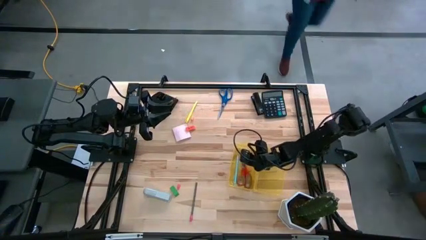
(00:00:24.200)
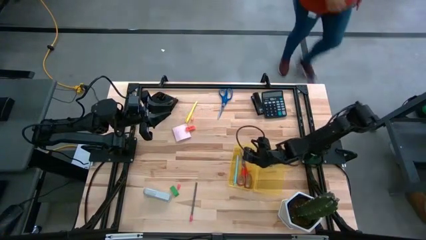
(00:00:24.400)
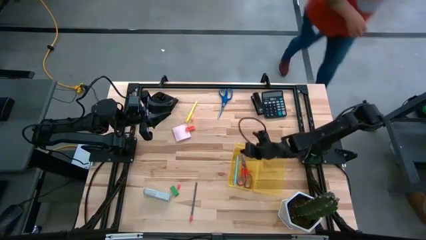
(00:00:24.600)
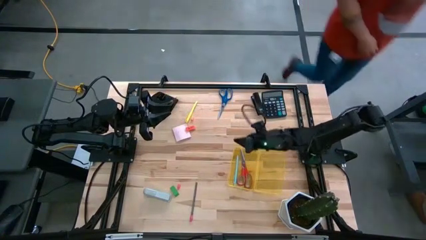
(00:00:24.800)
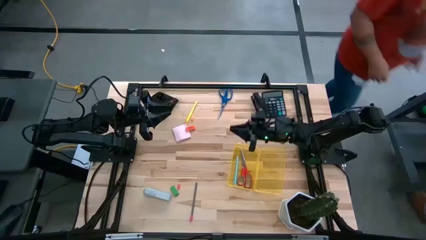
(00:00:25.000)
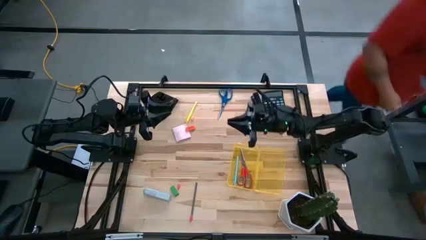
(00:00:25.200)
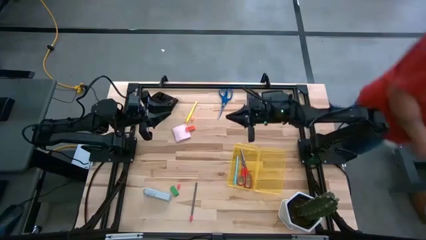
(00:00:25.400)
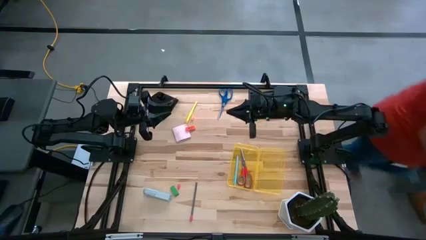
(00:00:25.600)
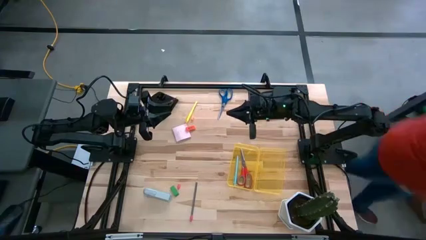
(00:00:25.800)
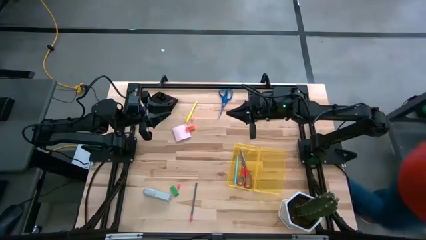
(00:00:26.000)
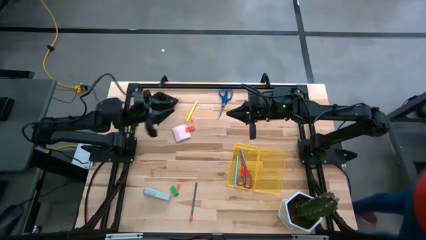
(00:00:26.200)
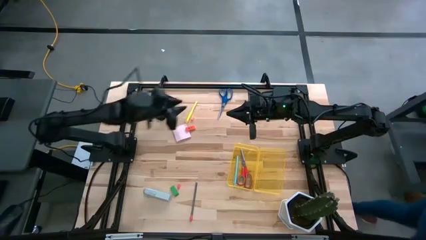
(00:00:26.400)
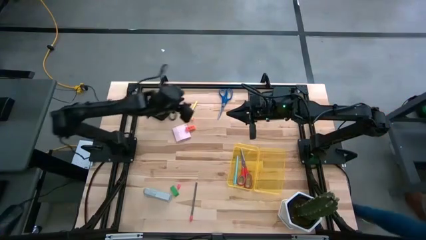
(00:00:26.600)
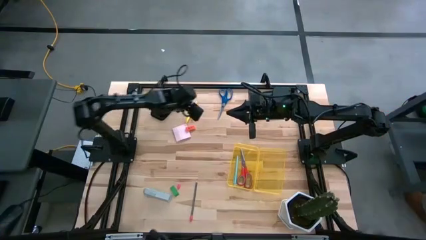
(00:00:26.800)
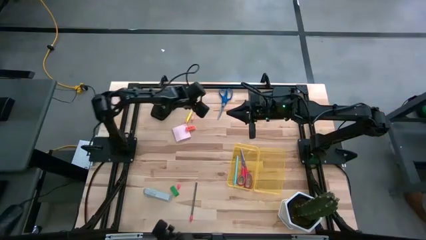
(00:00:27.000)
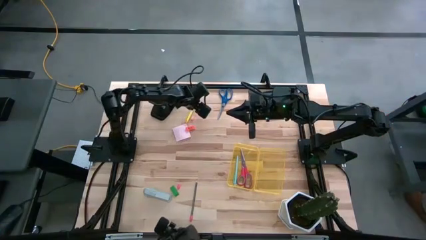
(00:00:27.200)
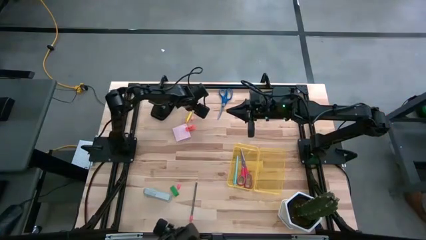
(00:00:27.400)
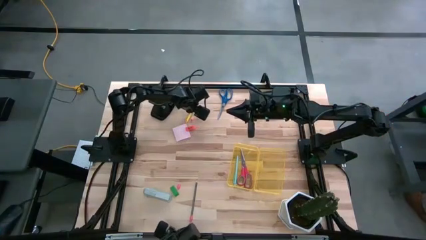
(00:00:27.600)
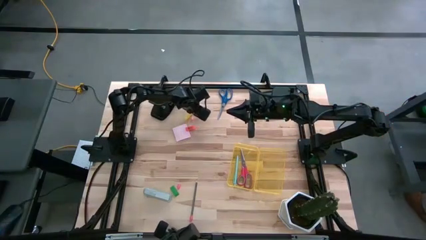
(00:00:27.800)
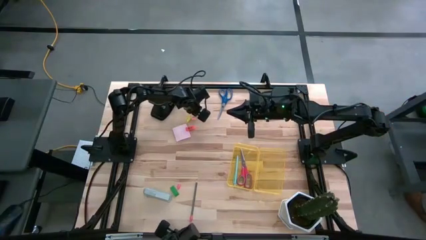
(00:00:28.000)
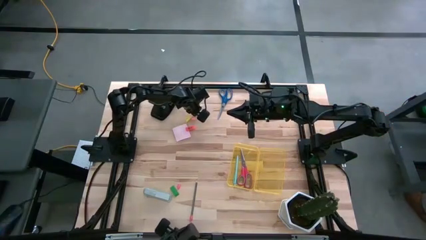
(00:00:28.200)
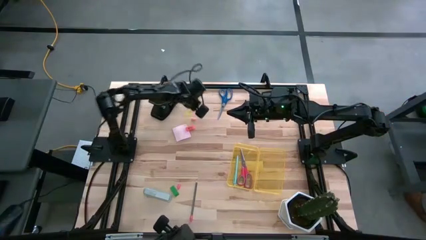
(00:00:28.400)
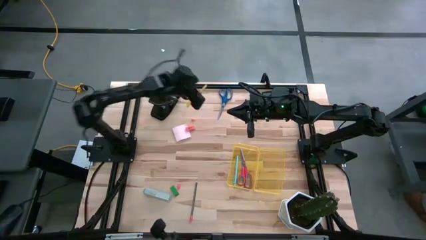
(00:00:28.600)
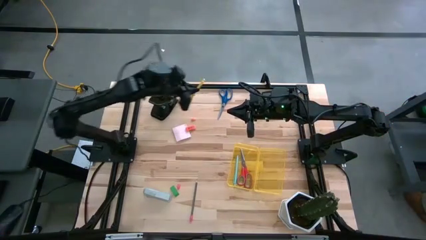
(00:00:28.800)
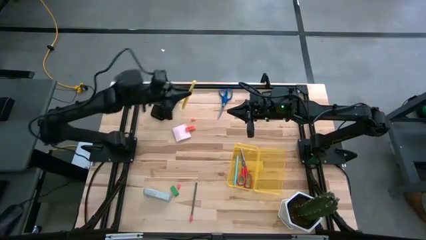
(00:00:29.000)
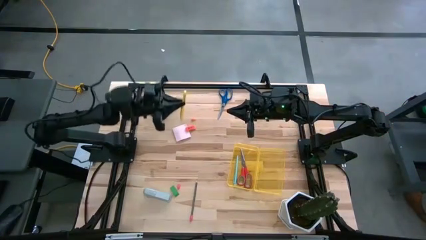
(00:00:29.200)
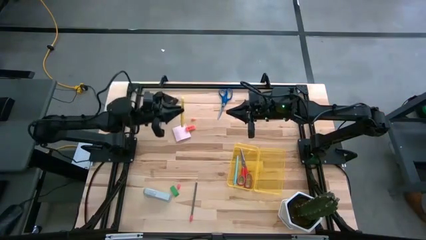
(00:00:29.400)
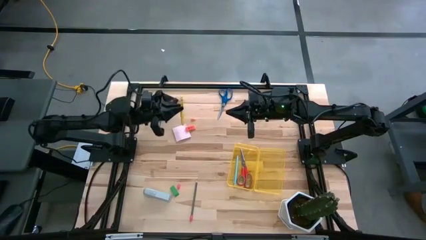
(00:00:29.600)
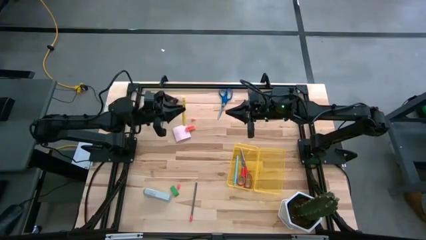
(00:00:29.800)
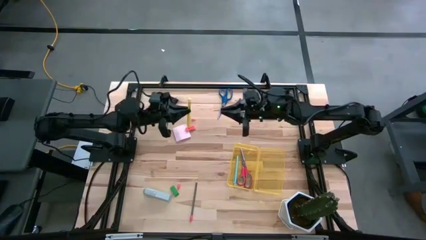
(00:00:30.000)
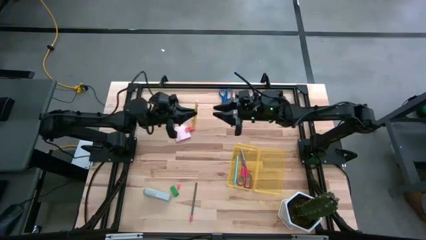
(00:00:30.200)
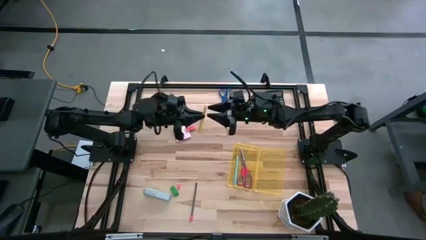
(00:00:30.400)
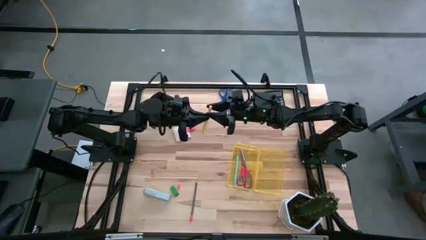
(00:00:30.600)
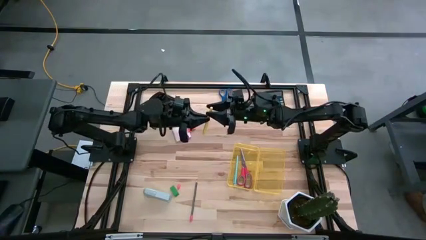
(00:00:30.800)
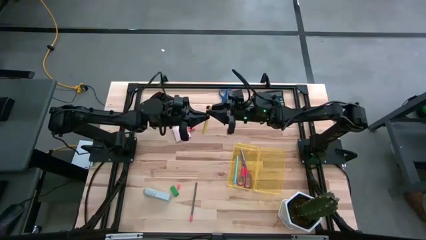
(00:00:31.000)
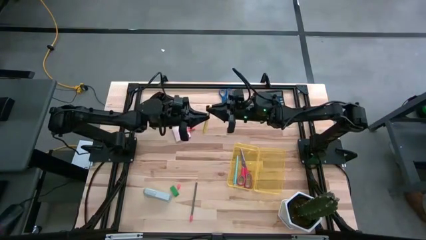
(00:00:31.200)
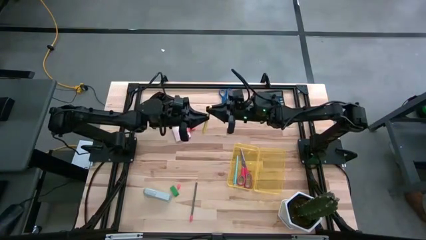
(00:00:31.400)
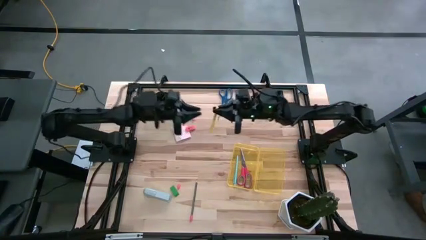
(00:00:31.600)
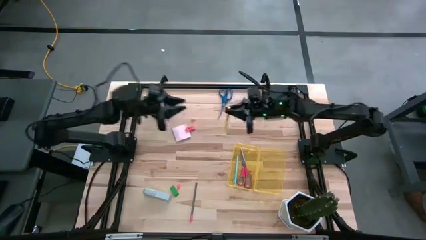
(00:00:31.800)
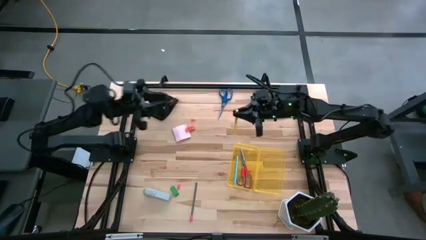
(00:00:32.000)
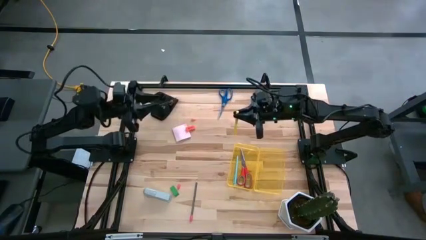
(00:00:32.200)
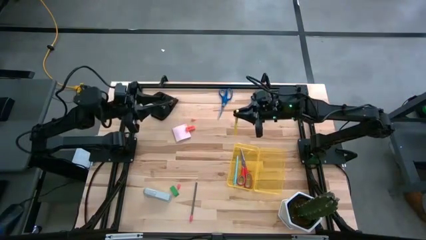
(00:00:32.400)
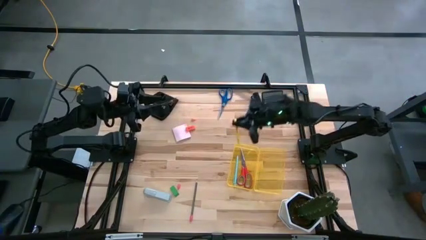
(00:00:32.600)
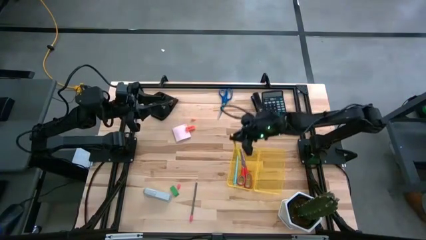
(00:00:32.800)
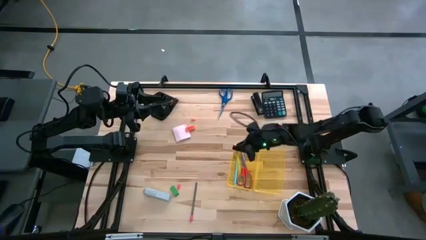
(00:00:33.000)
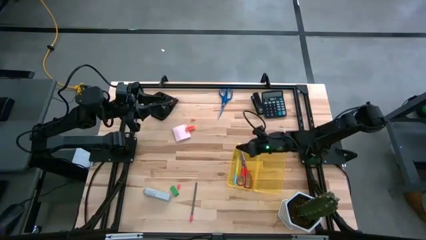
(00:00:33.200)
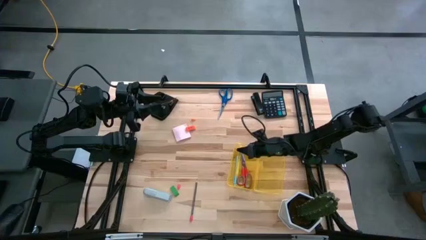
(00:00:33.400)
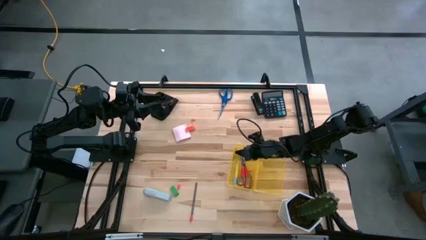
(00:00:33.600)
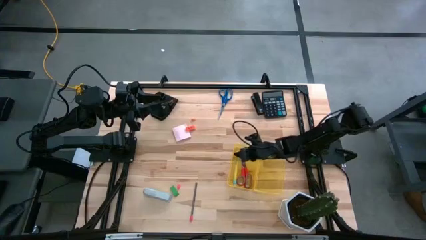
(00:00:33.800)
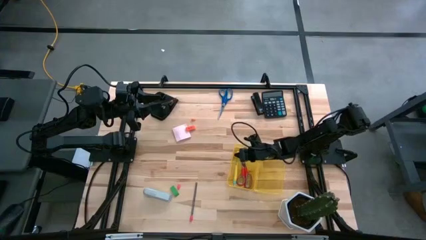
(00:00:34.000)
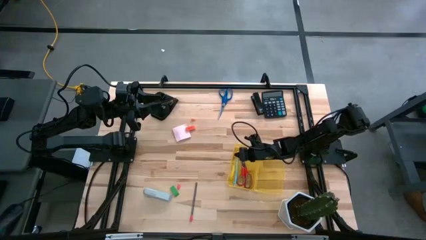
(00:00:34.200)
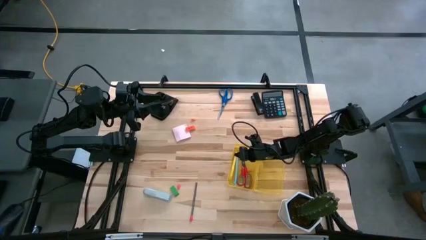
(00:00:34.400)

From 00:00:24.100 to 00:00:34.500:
Task: Pack school essentials
Put the yellow pen into the supply box
